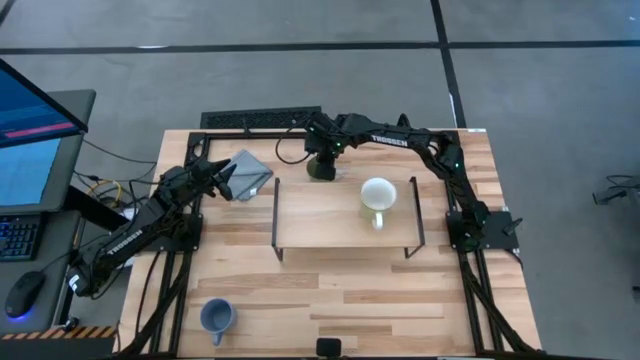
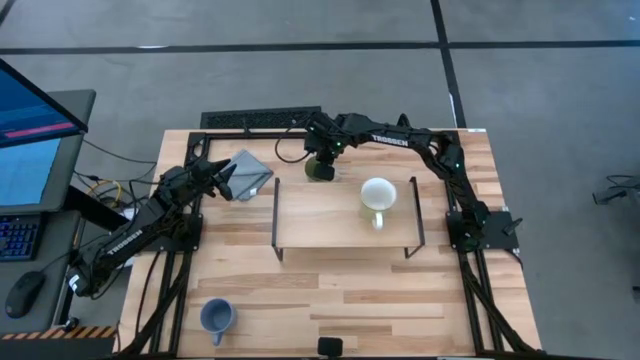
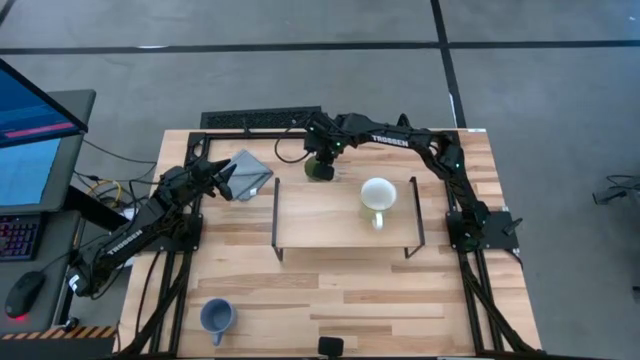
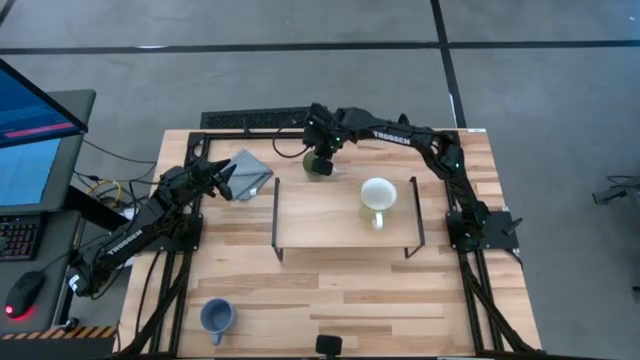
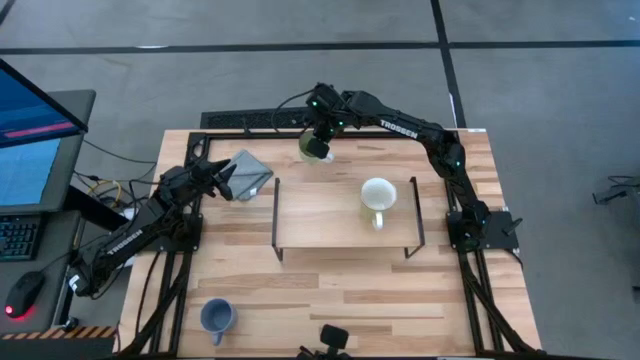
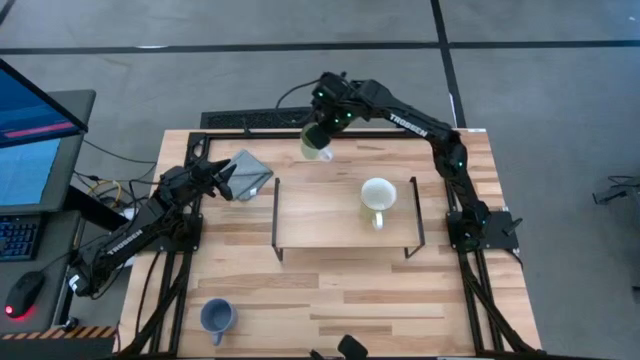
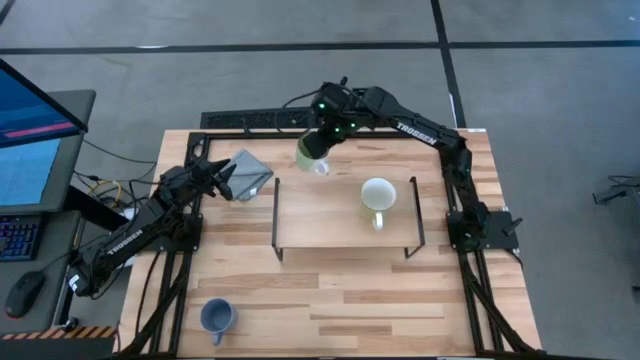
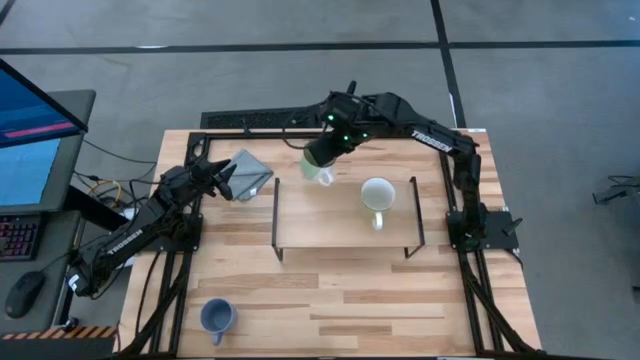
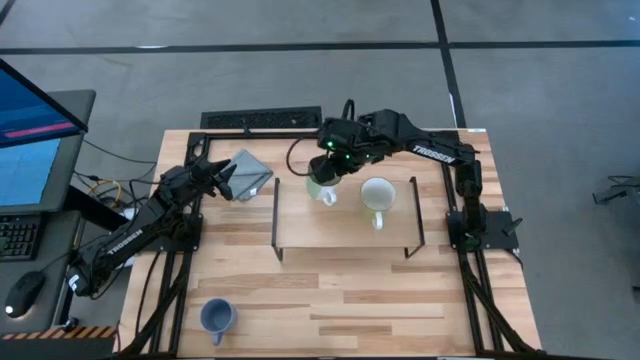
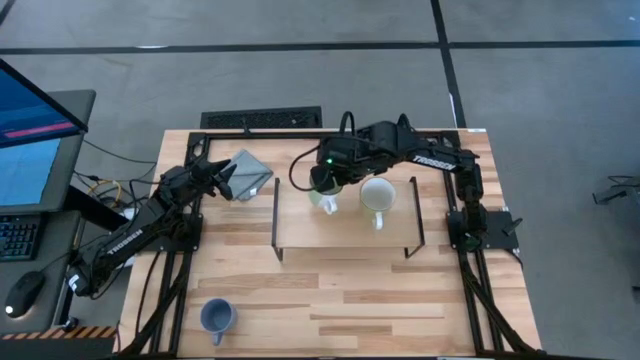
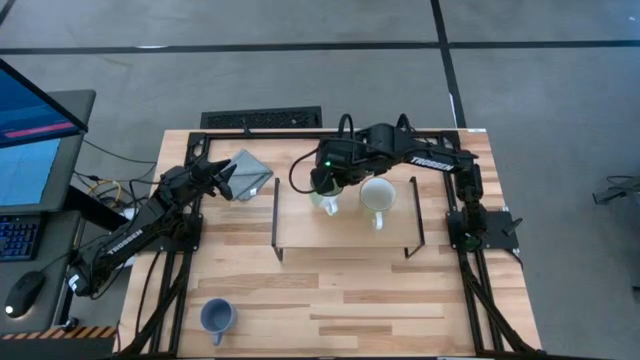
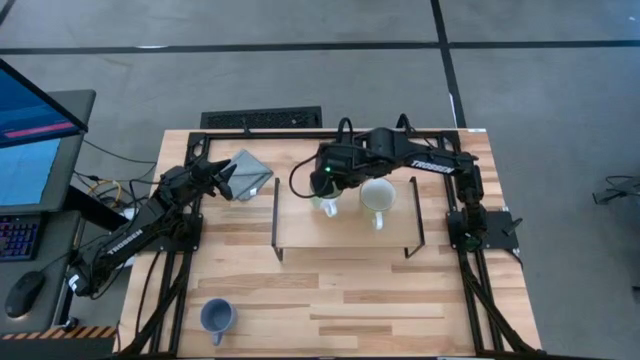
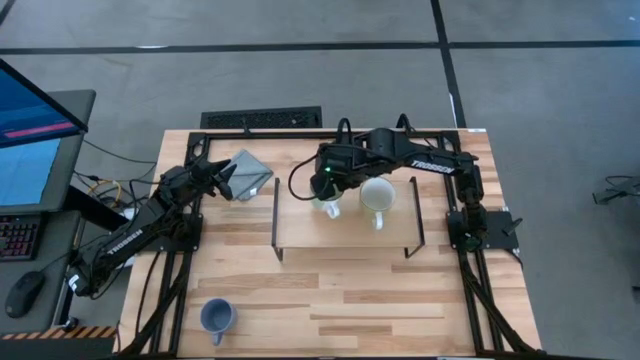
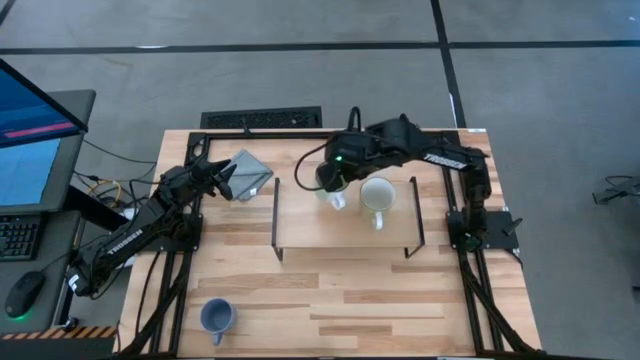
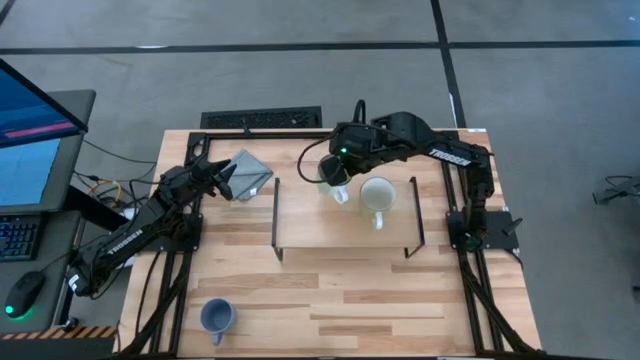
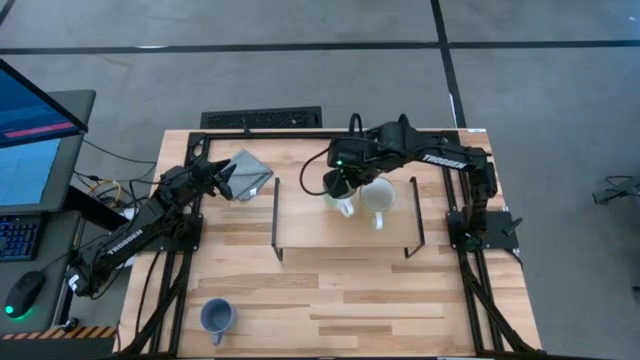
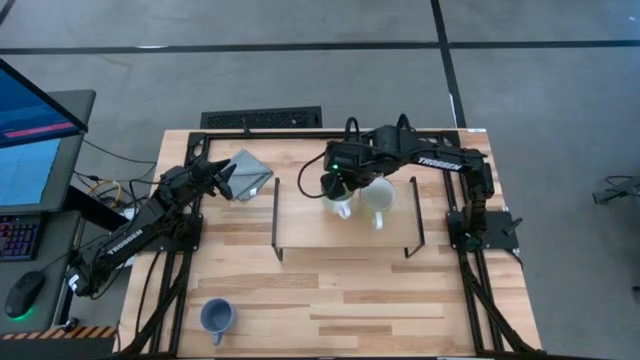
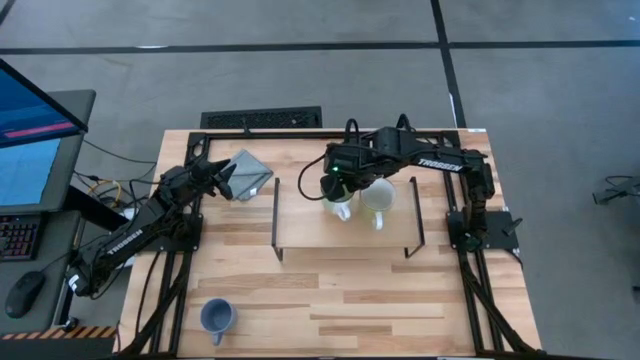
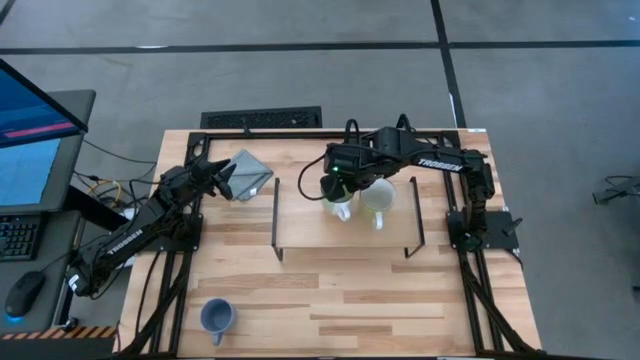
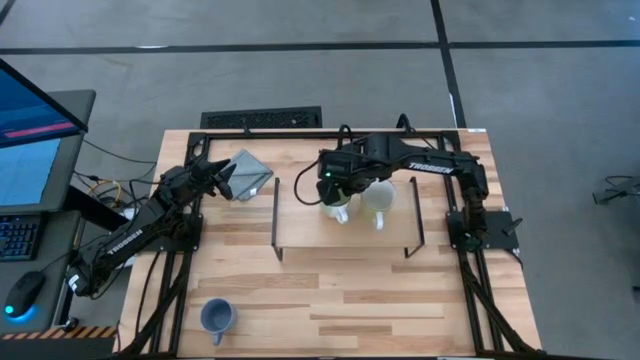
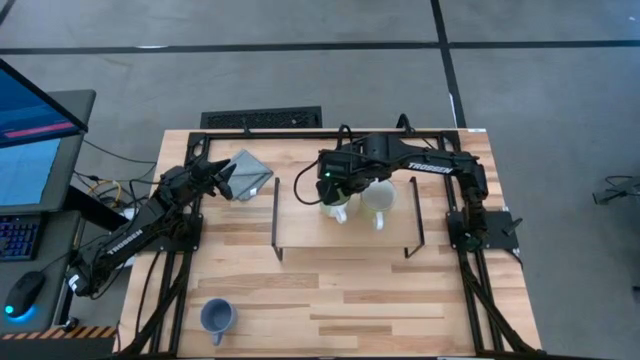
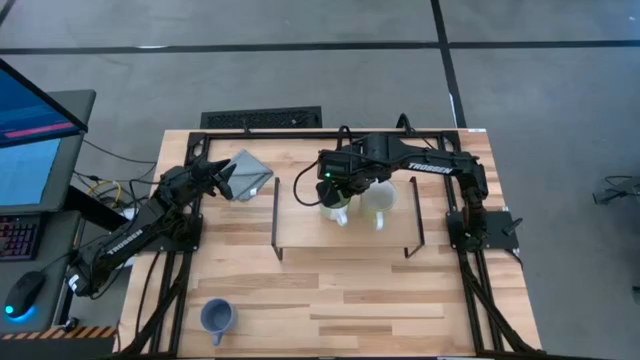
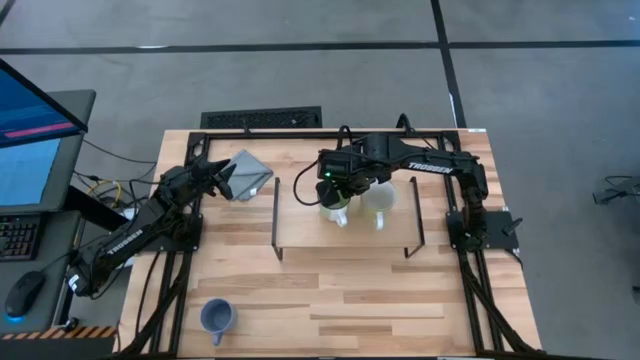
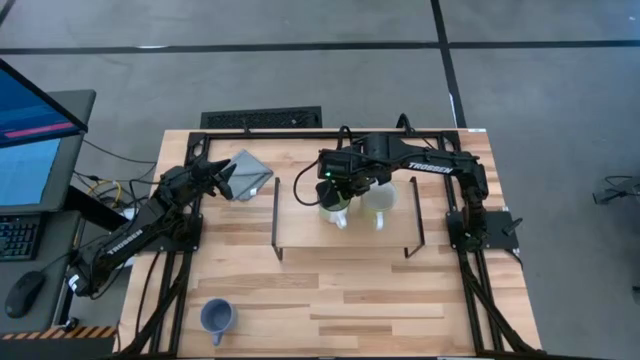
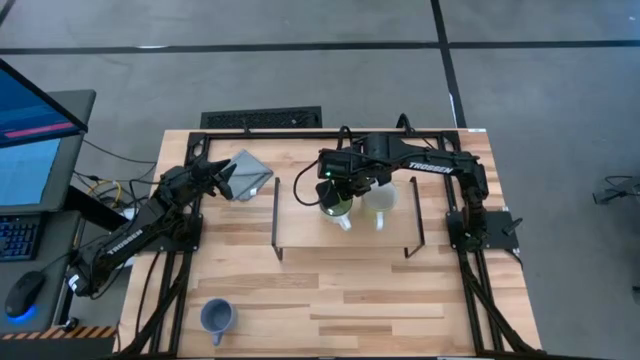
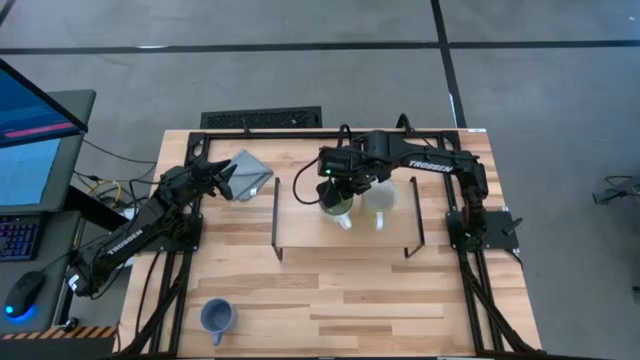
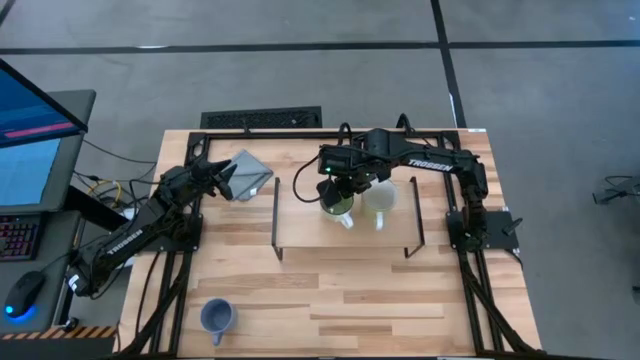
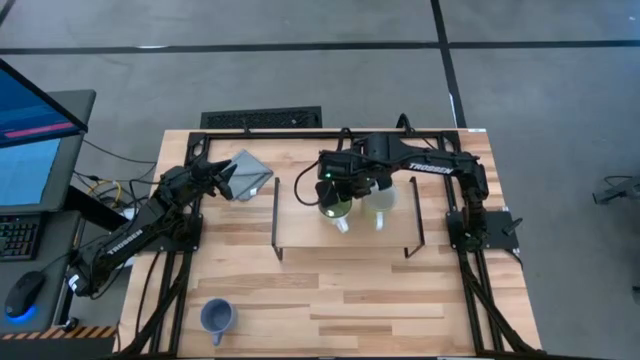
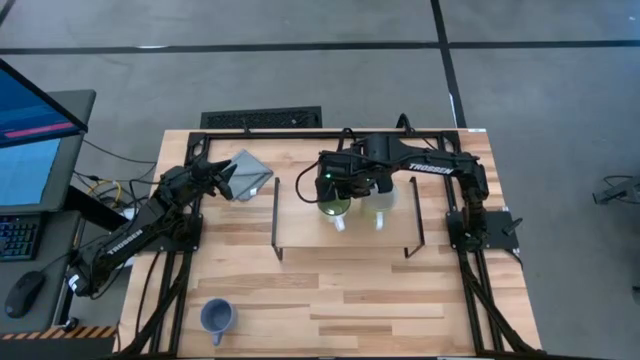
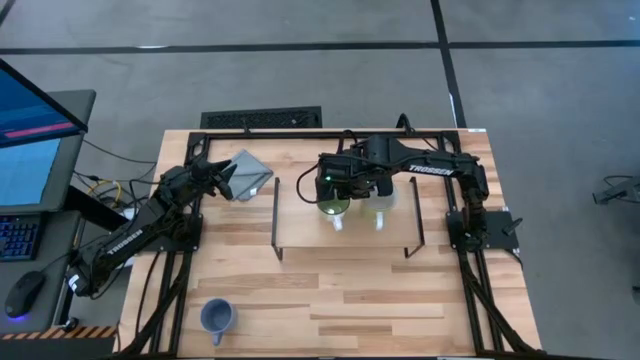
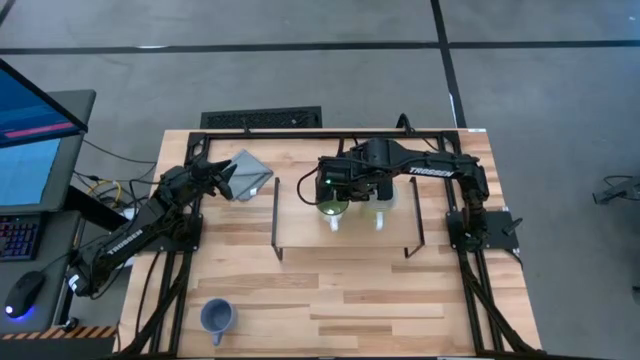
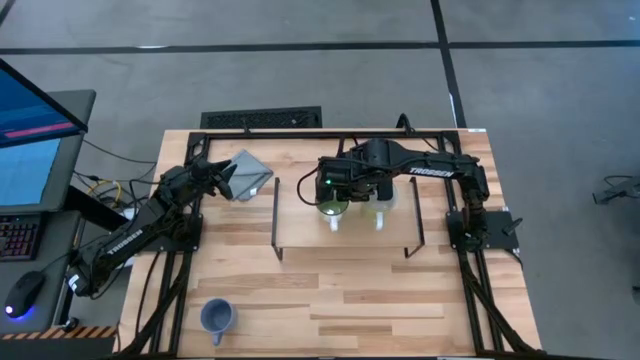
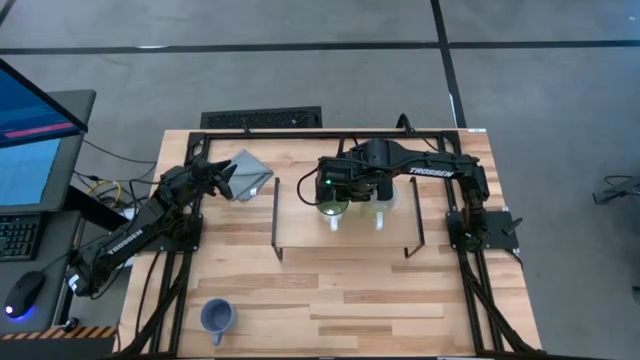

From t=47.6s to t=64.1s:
Task: Stack small to large cups/mugs on shelf
Put the green mug on the shelf

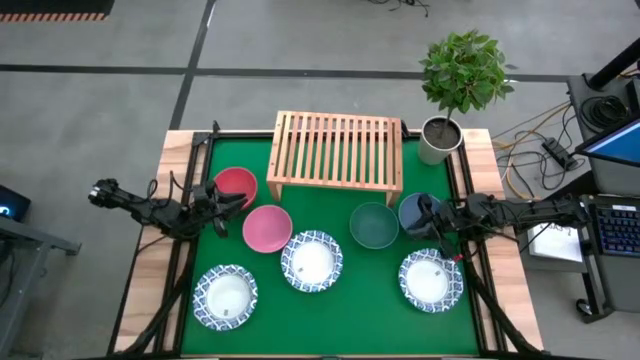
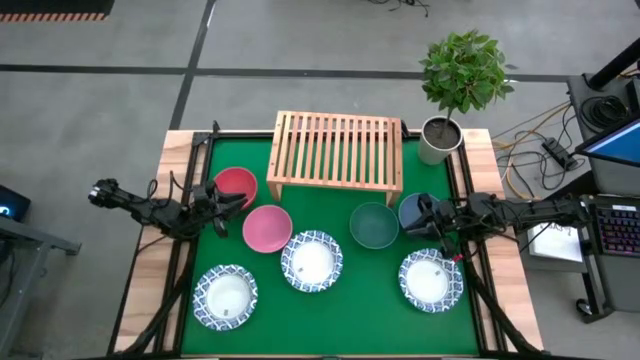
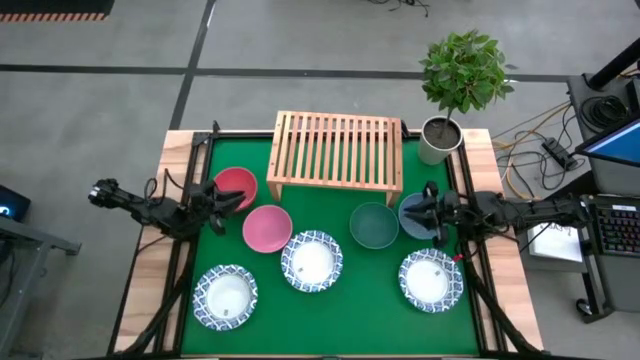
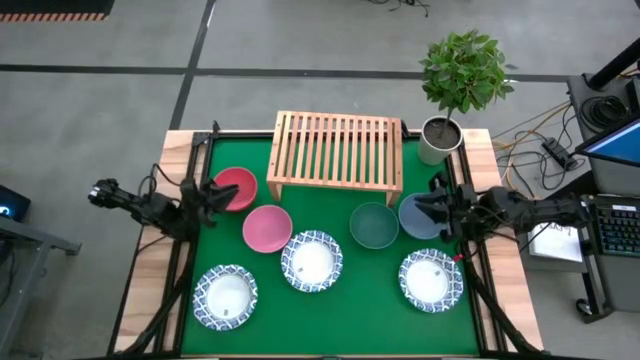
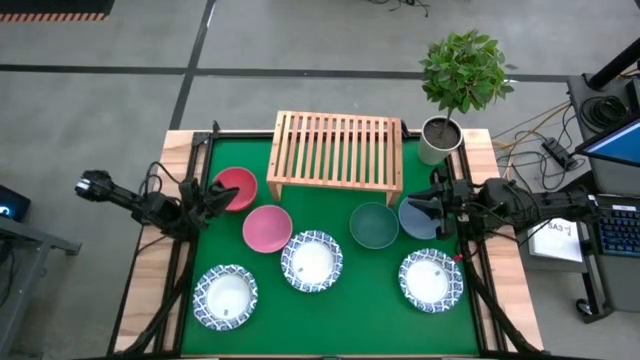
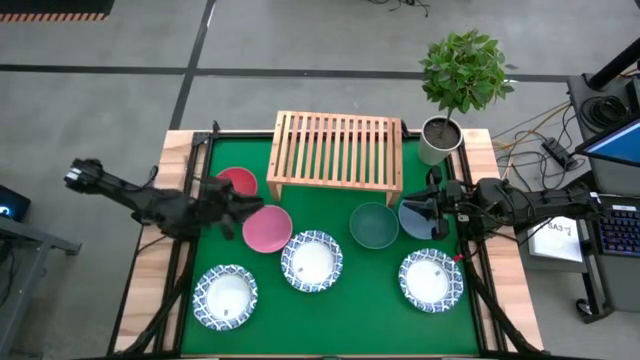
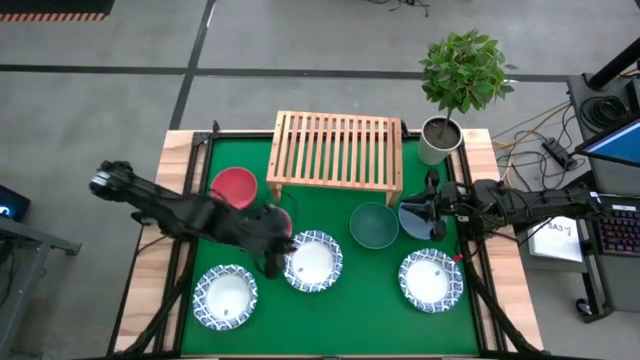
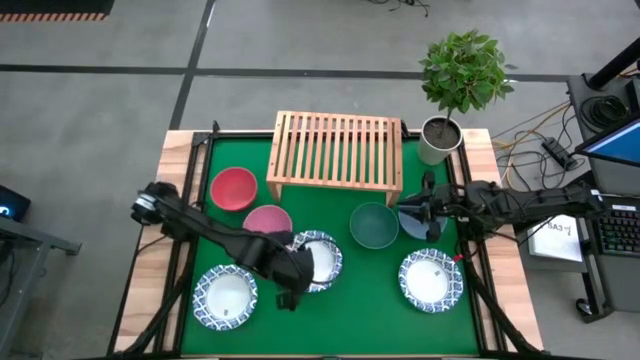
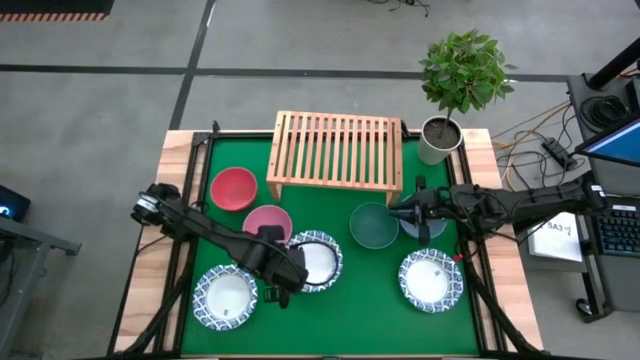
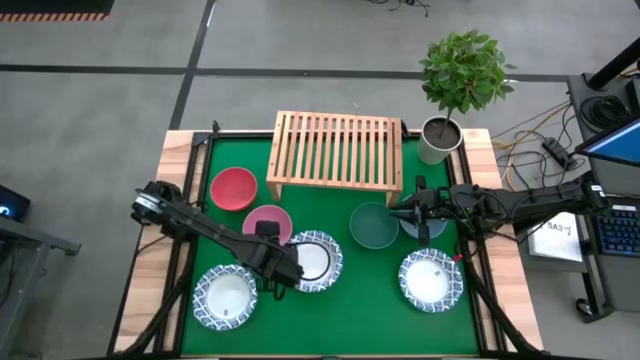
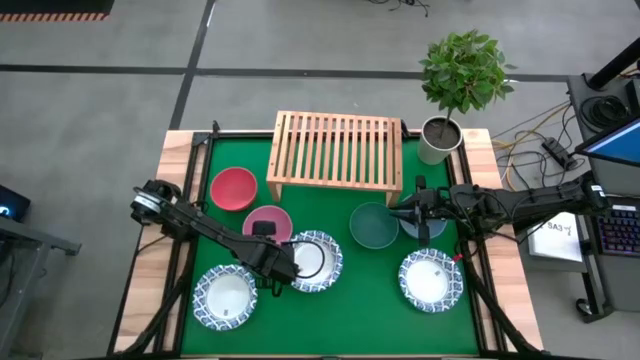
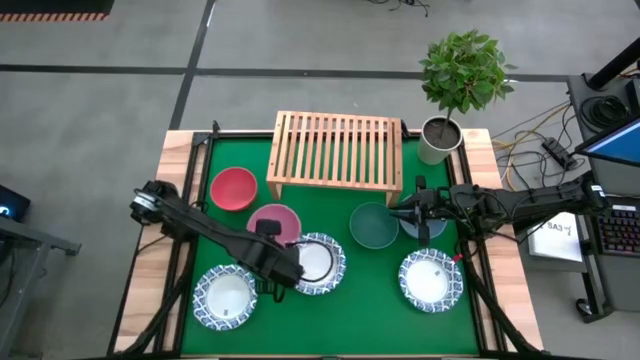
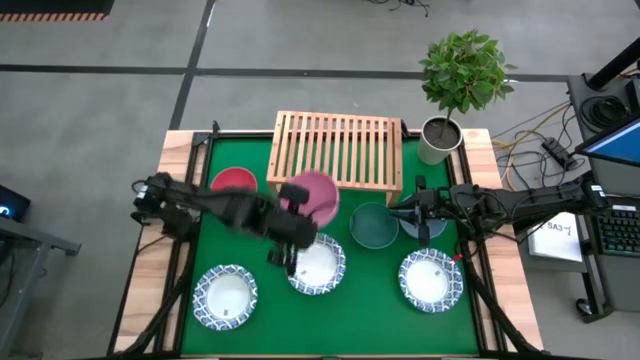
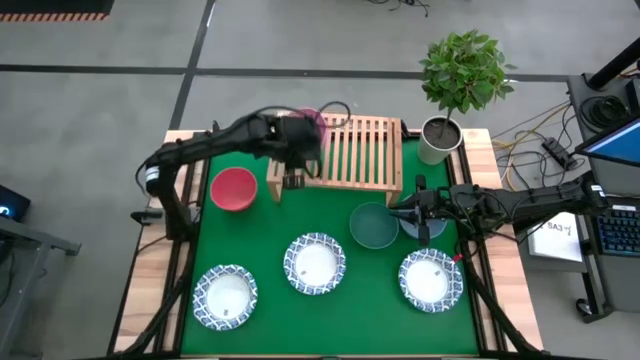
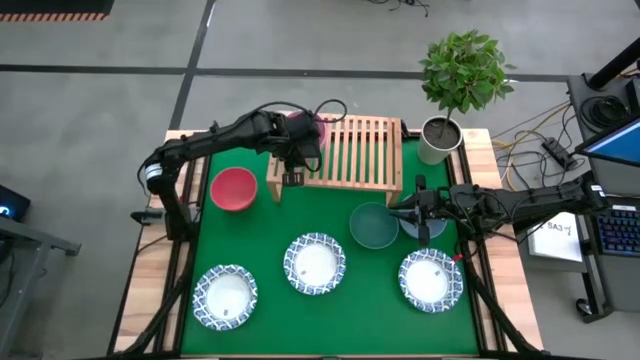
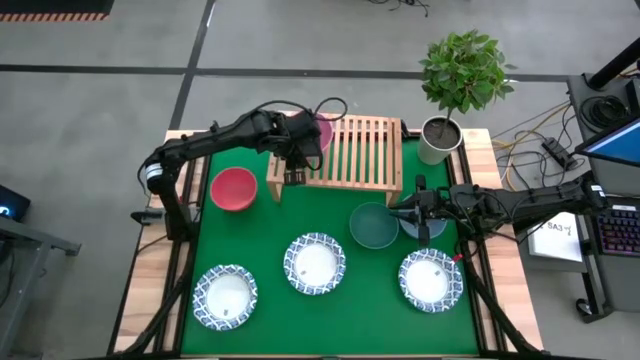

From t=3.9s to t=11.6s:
Task: Place and stack bowls onto a shelf
Put the pink bowl on the shelf
